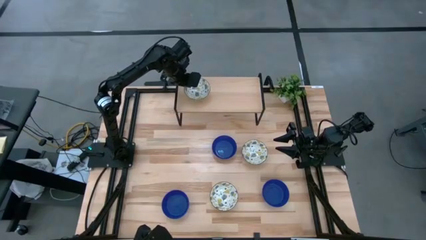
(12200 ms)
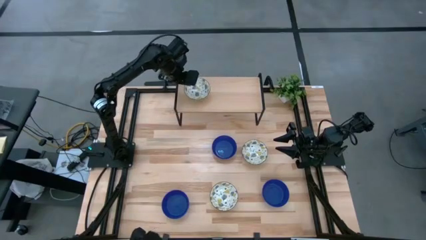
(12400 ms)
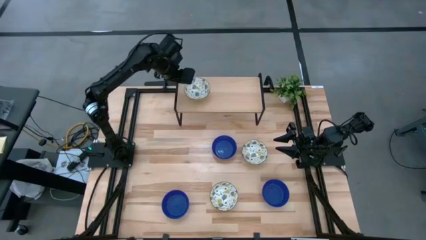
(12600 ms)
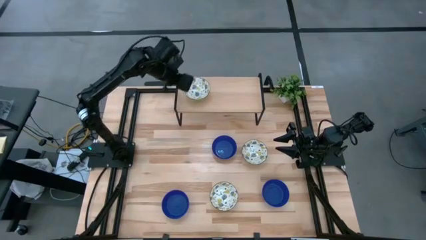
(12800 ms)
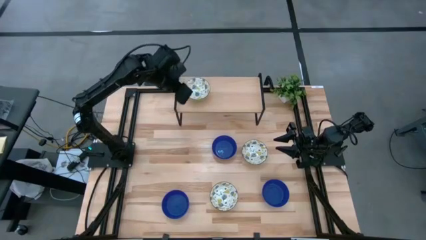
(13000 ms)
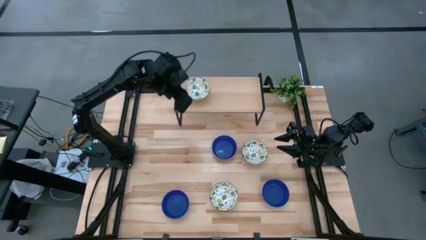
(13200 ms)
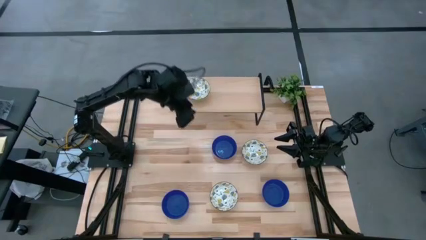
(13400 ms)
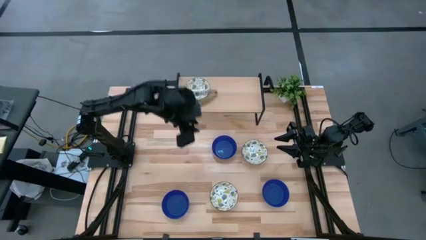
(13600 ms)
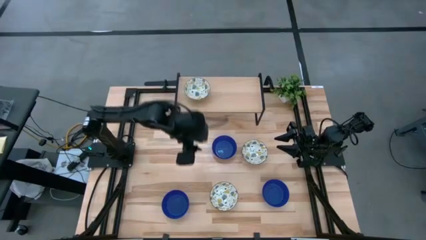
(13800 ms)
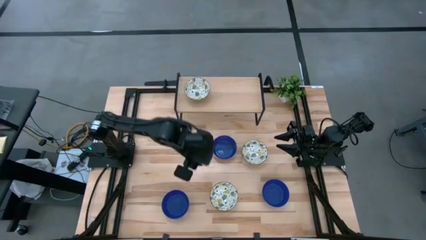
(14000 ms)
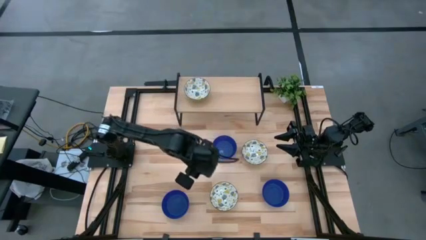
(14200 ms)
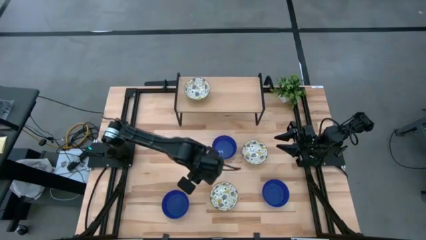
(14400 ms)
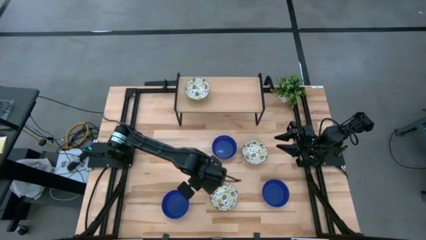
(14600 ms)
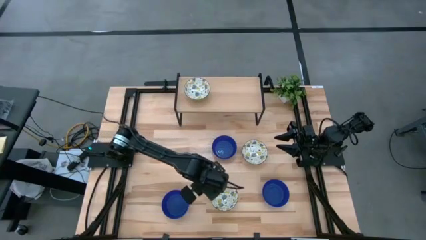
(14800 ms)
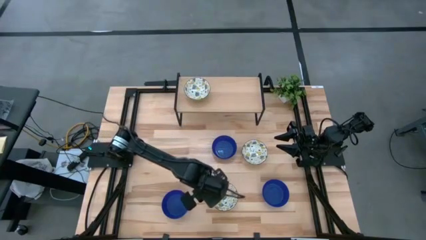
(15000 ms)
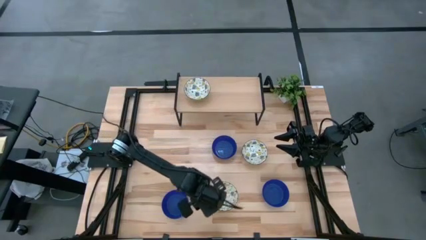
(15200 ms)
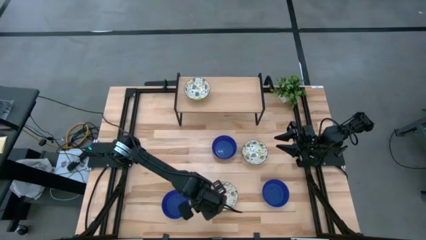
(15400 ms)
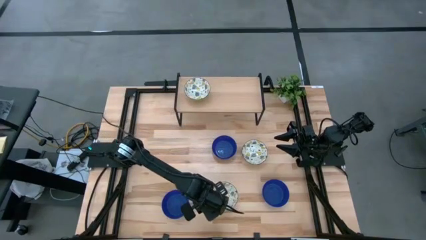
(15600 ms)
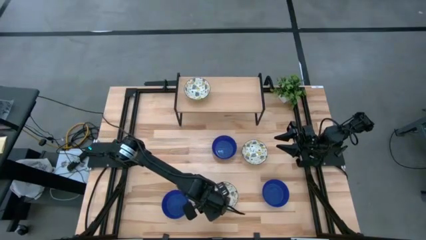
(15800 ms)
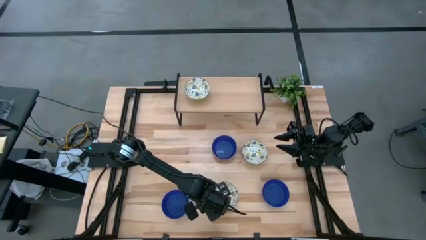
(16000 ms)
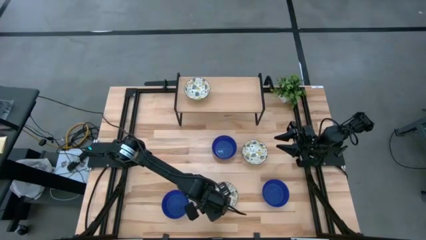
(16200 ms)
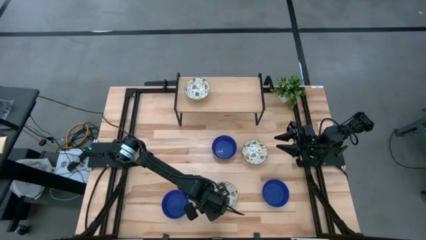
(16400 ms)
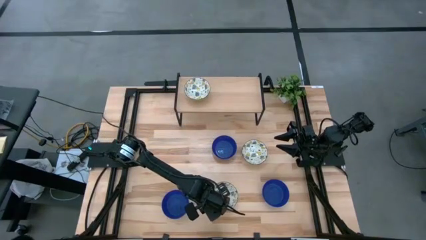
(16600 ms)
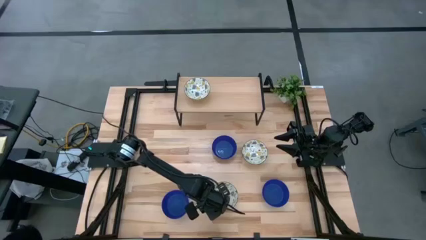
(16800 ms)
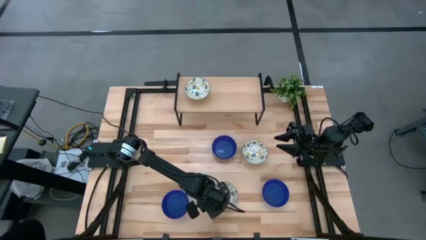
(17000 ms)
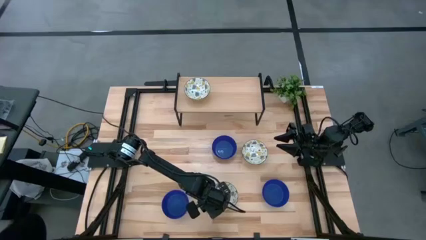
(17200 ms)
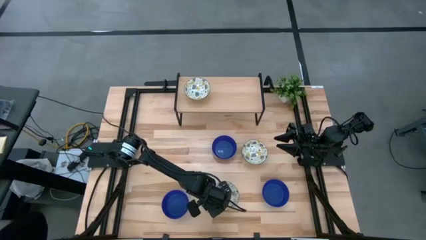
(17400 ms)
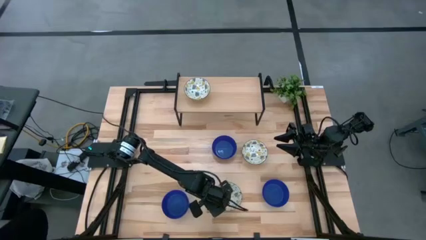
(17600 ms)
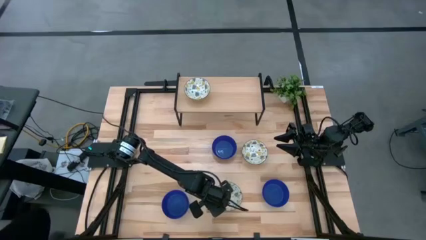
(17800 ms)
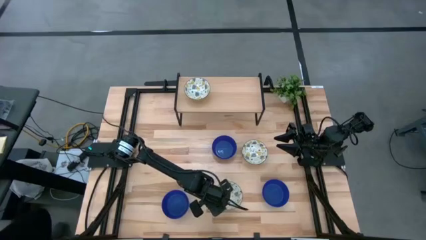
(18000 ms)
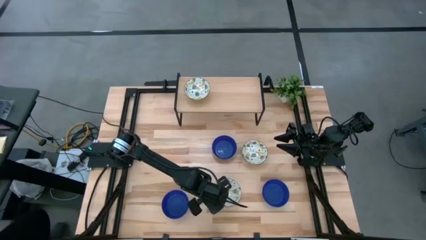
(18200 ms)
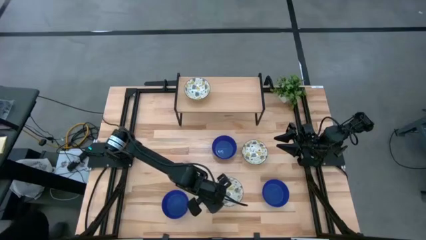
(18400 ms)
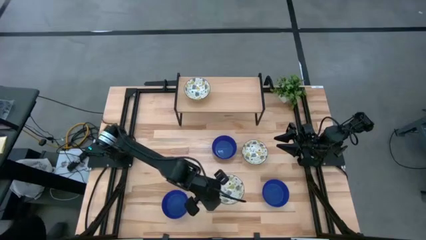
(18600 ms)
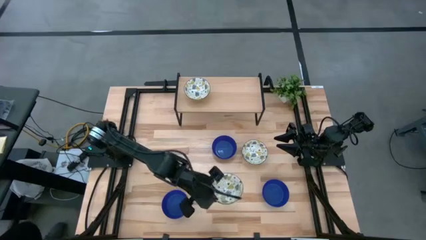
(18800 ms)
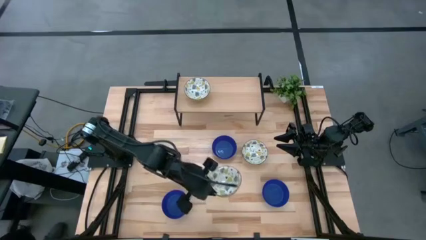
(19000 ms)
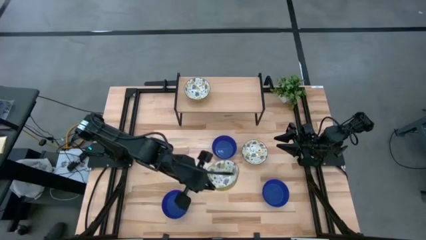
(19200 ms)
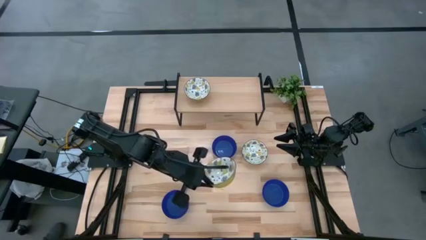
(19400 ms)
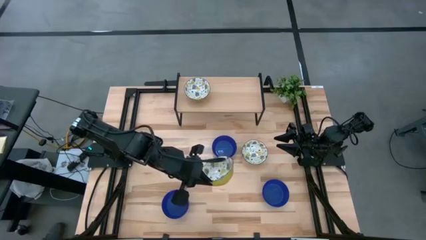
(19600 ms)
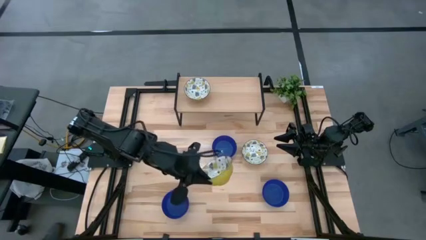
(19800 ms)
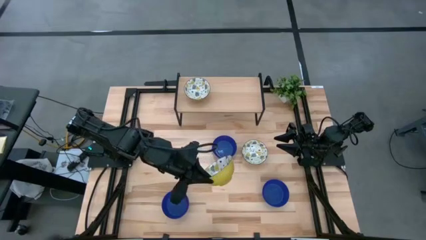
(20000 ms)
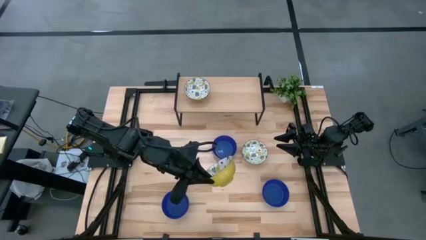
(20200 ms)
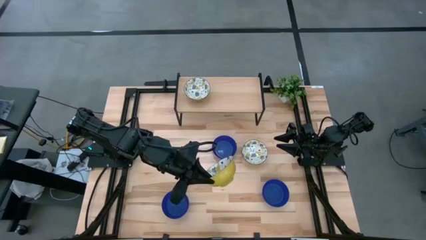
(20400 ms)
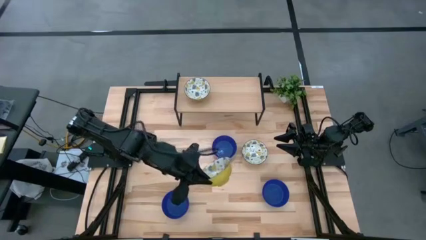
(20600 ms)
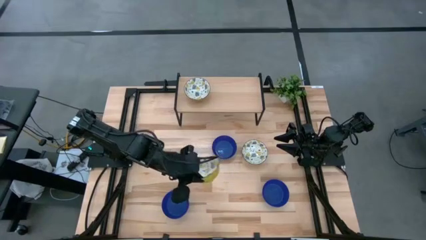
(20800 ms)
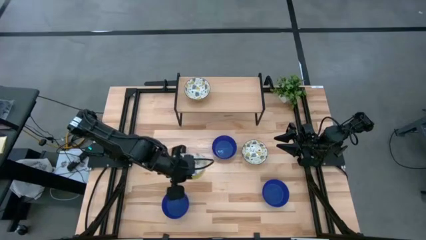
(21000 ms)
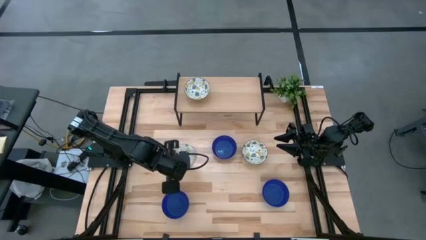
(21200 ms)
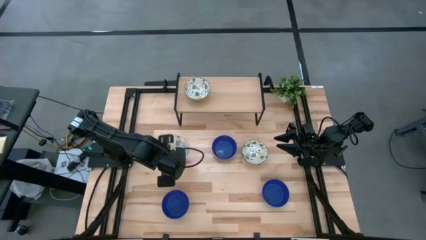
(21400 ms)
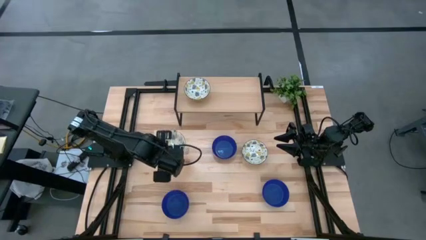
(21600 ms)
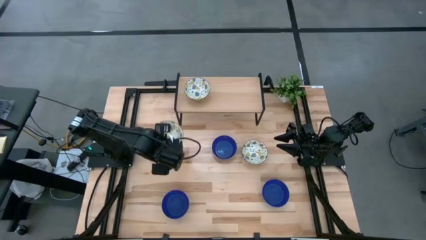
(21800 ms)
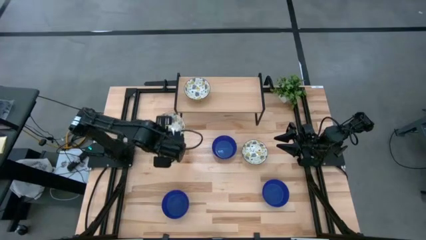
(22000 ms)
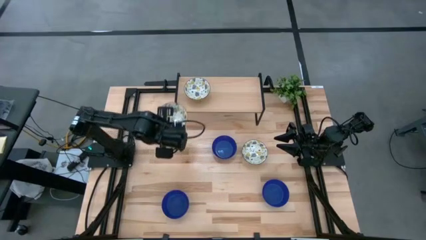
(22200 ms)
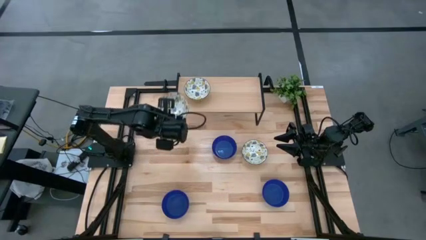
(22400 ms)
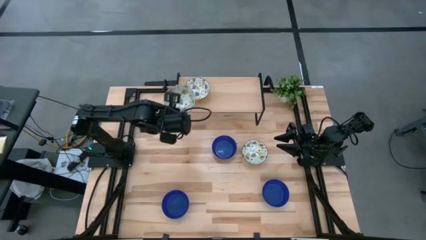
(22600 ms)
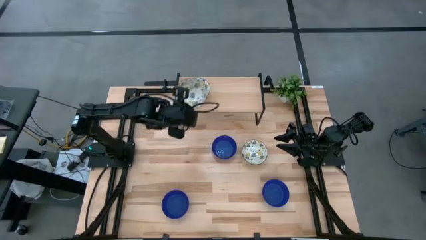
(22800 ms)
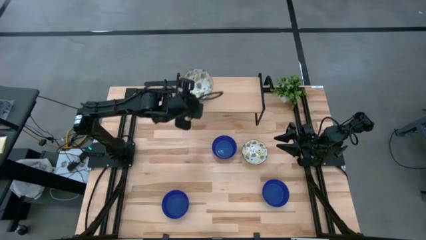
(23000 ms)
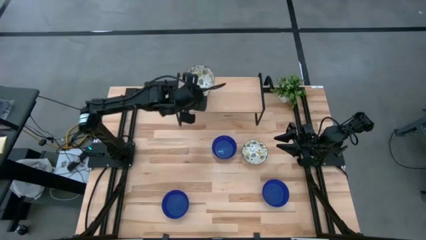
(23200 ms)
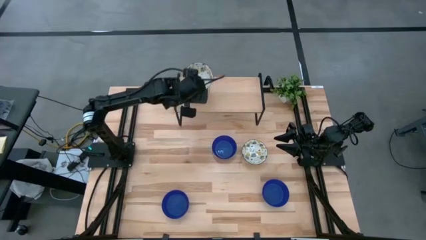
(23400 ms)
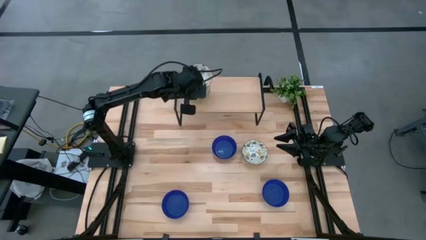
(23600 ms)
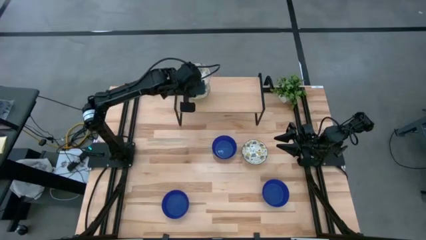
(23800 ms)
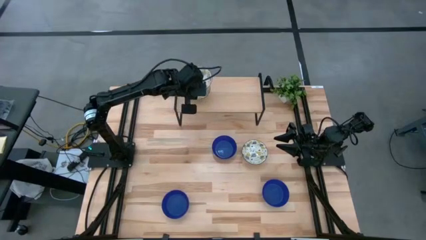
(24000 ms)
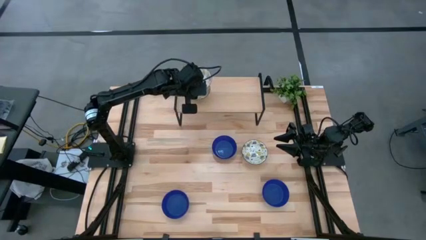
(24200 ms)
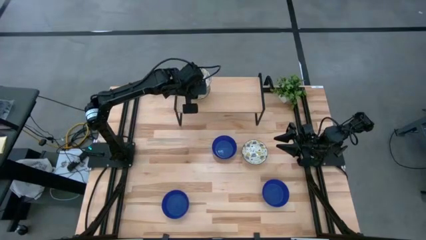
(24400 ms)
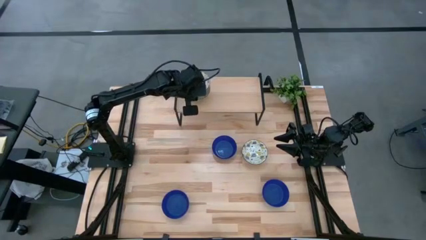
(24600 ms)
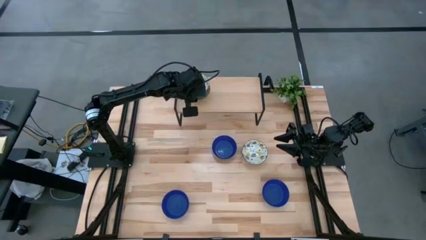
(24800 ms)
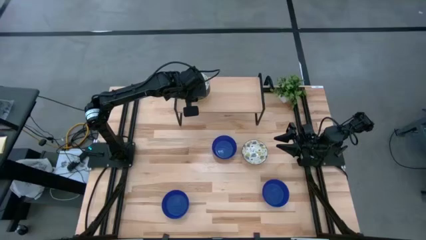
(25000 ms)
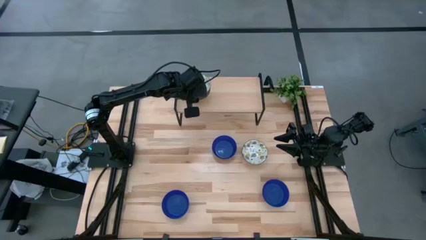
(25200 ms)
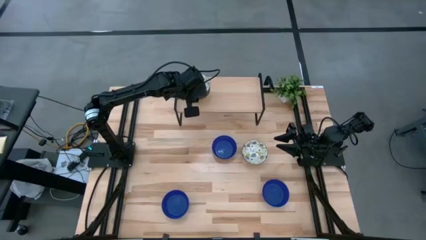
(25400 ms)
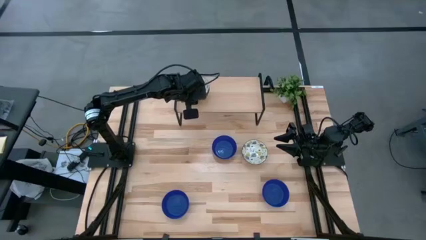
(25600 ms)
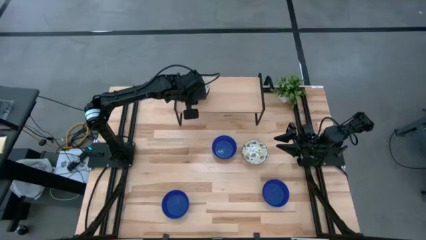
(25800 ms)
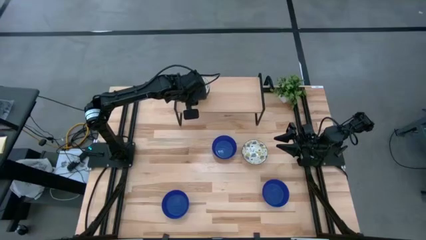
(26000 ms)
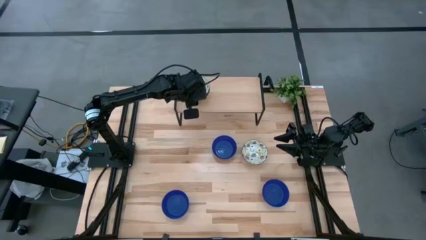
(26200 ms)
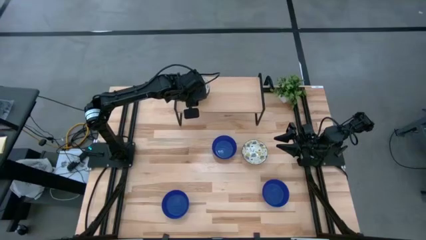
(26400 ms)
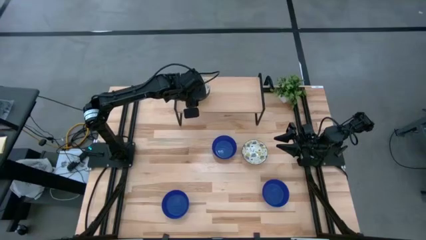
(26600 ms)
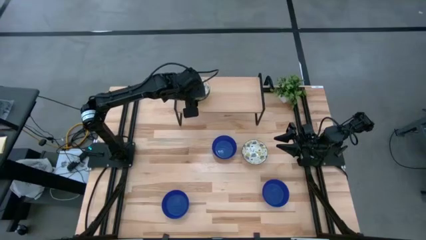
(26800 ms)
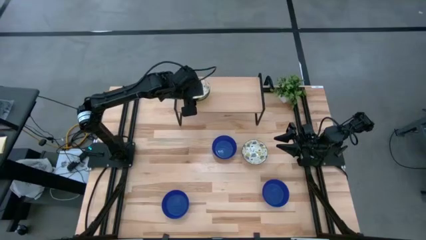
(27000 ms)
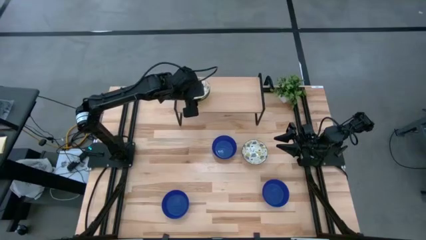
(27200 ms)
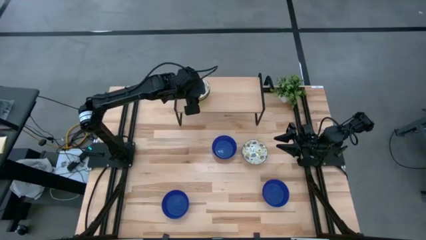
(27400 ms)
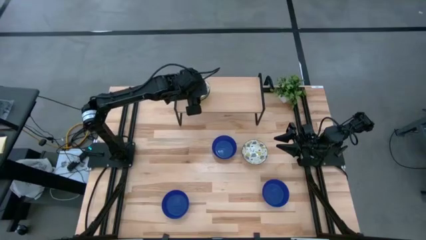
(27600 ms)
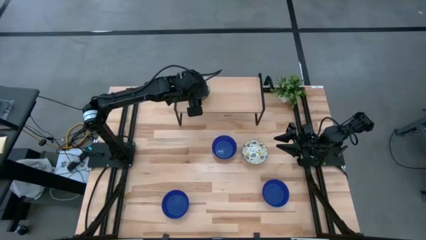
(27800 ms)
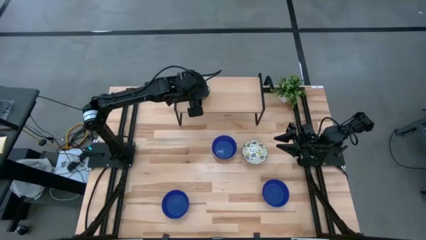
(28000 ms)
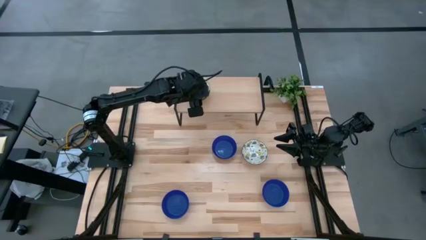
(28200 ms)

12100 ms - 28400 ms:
Task: Pick & Place Mini bowls
Stack the bottom white bowl on top of the white bowl on the shelf
